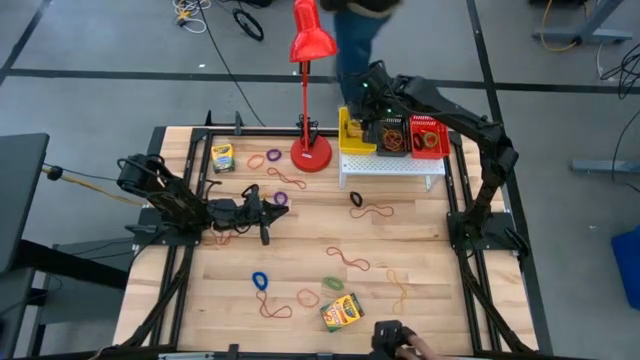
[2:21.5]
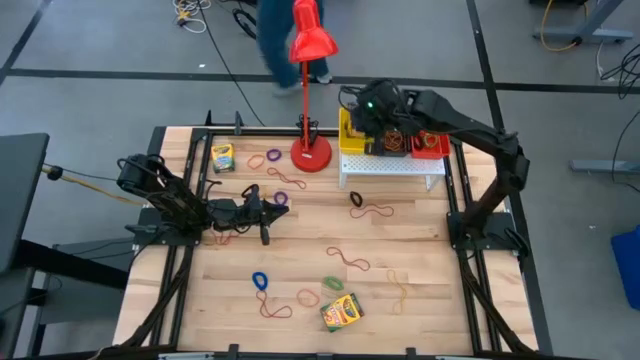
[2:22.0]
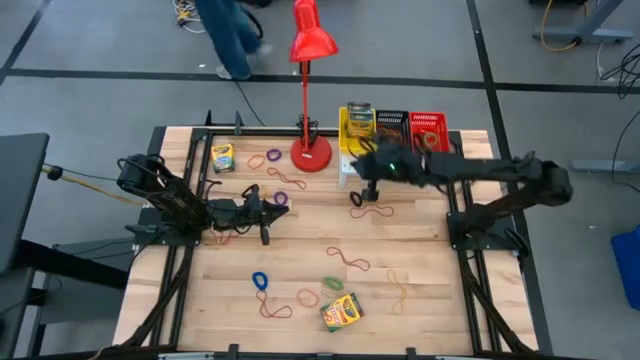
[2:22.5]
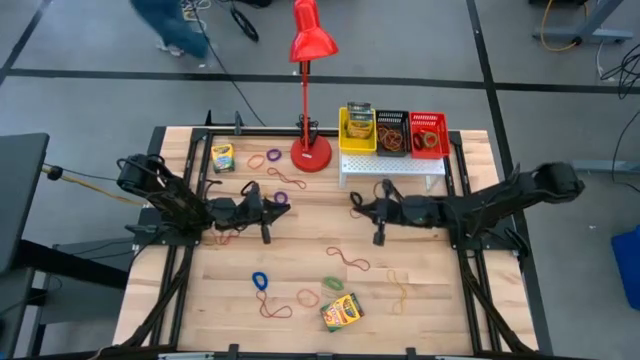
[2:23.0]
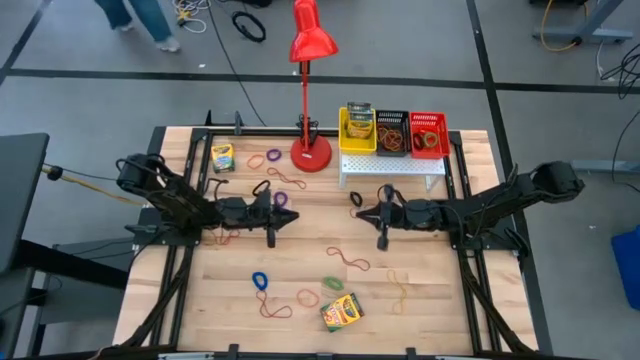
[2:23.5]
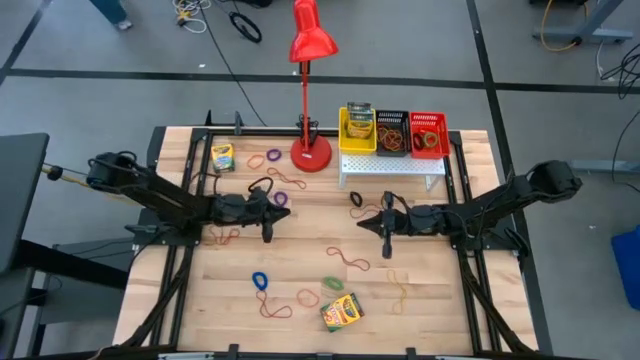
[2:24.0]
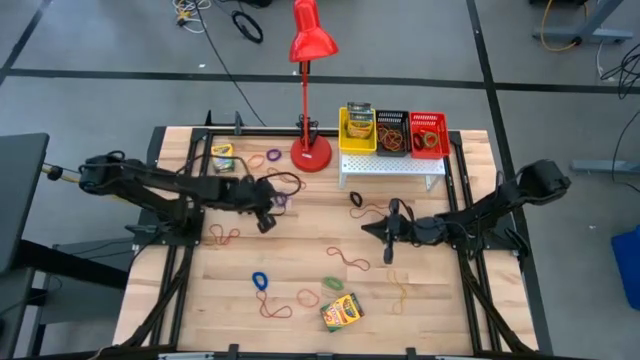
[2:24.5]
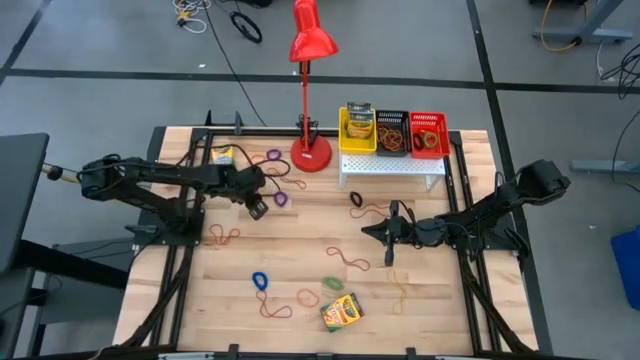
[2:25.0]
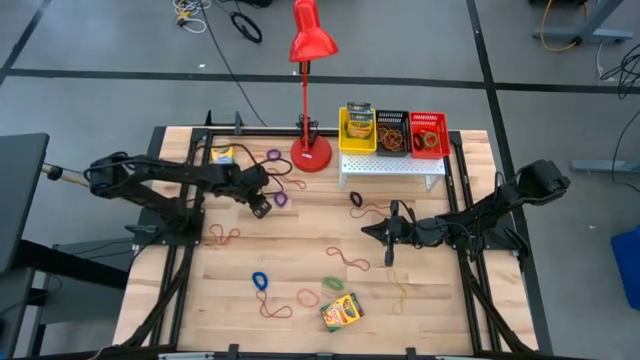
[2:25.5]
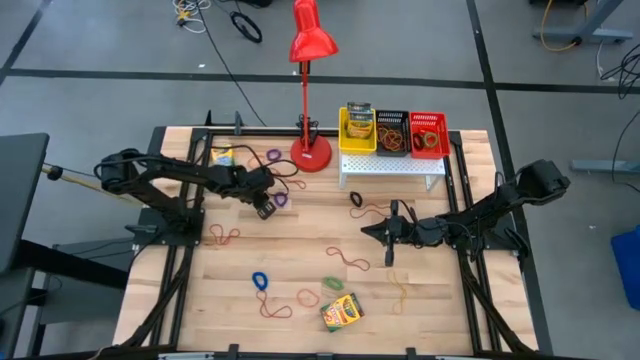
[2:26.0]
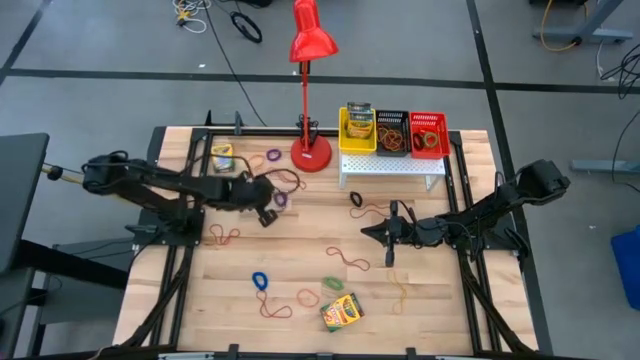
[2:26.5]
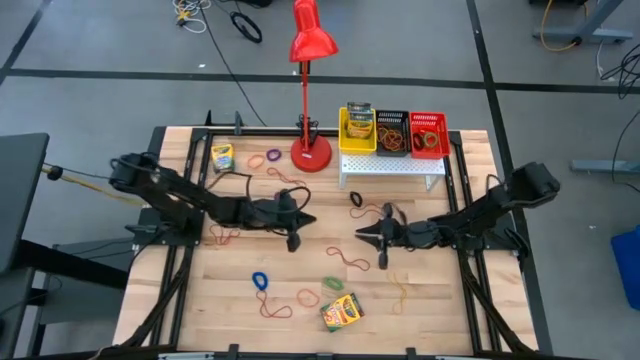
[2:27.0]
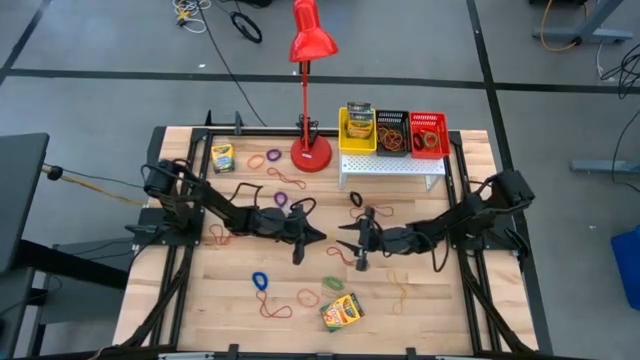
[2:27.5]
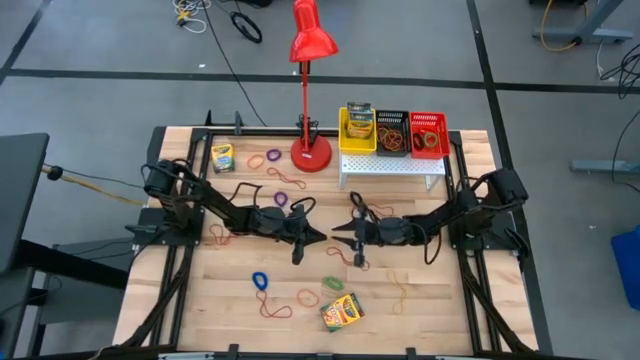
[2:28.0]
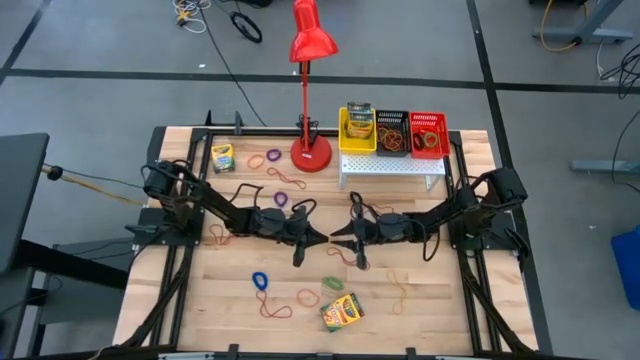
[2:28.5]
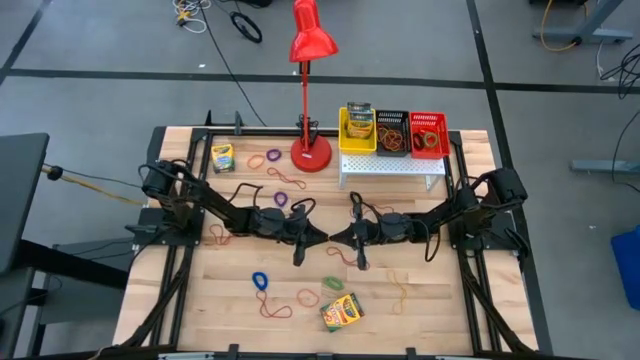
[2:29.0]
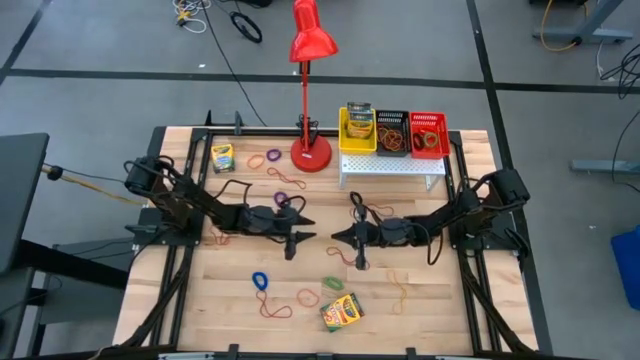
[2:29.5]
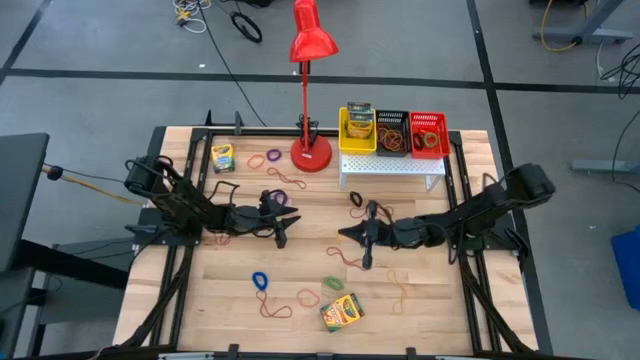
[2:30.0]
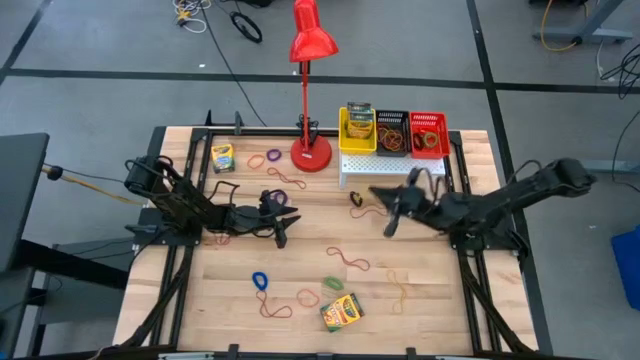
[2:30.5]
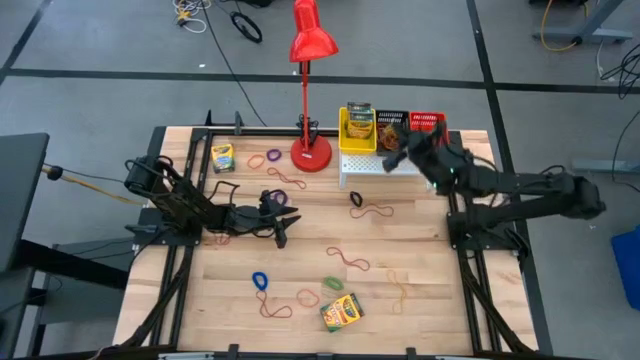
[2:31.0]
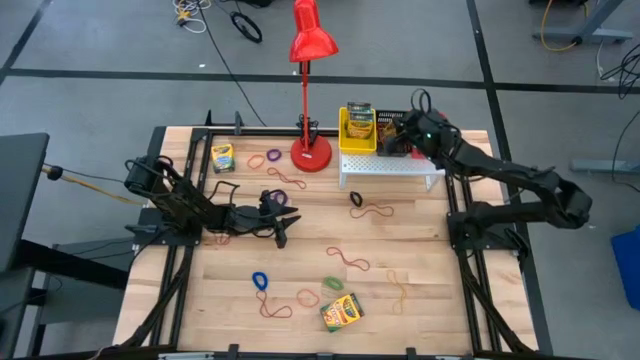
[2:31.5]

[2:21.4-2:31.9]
Task: Pick & Place Office Desk Supplies
Put the yellow rubber band into the black bin on the shelf

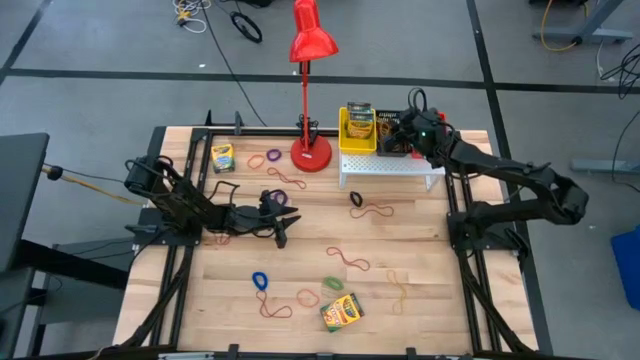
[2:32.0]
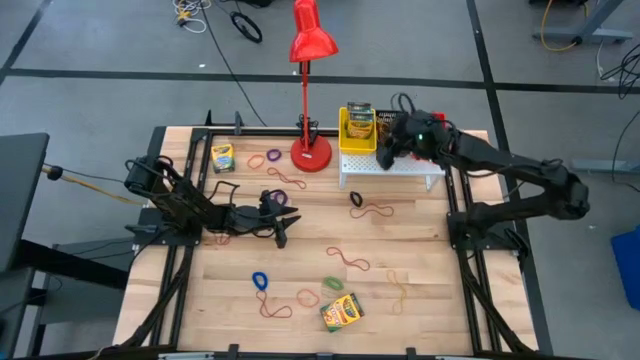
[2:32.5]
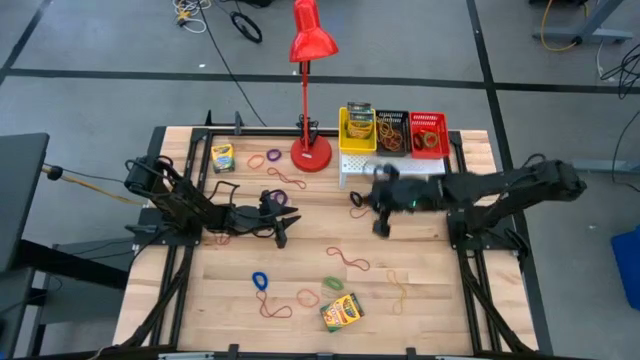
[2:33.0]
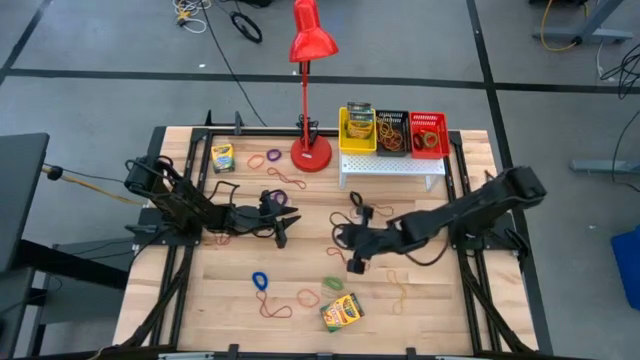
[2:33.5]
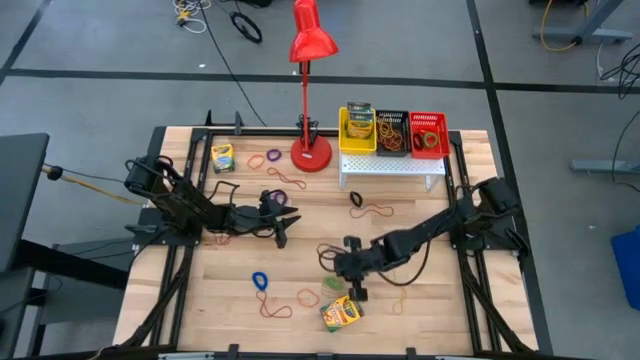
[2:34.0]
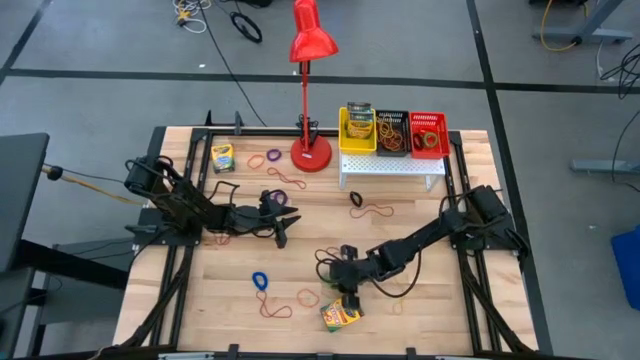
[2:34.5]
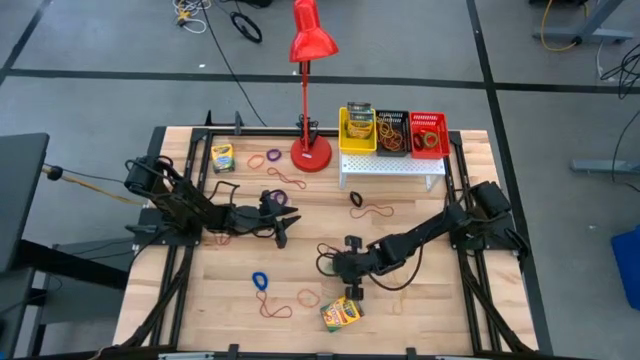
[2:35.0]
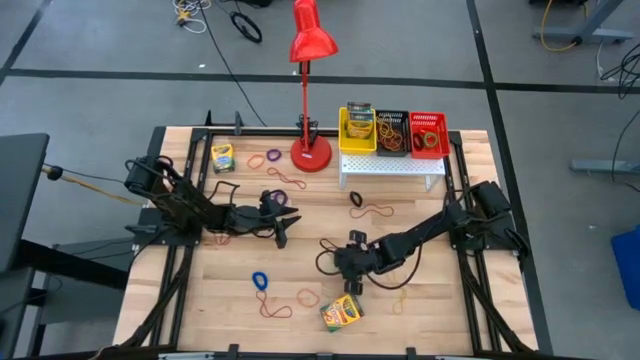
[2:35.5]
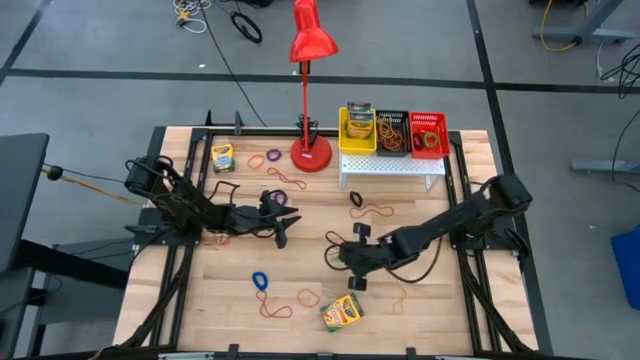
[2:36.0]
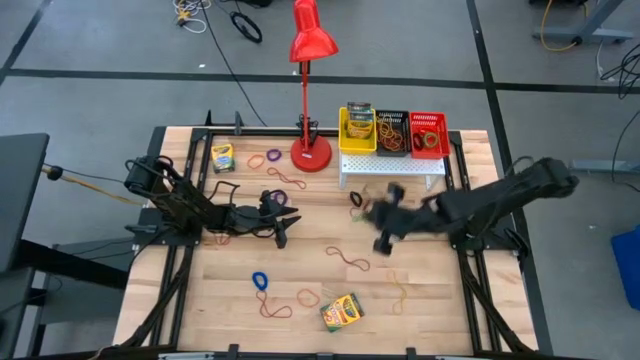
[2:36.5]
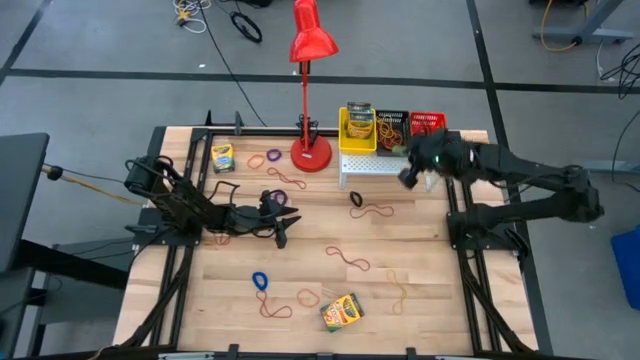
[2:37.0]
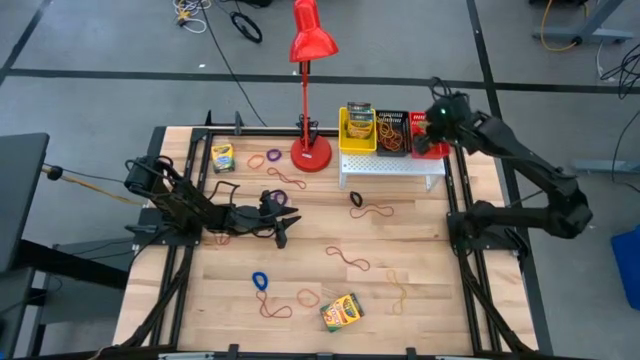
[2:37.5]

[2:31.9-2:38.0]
Put the green spring keychain into the red bin on the shelf

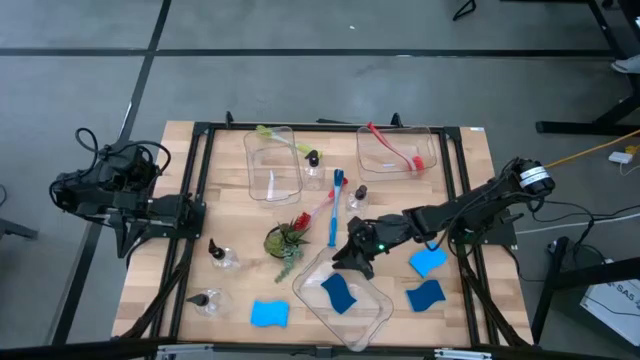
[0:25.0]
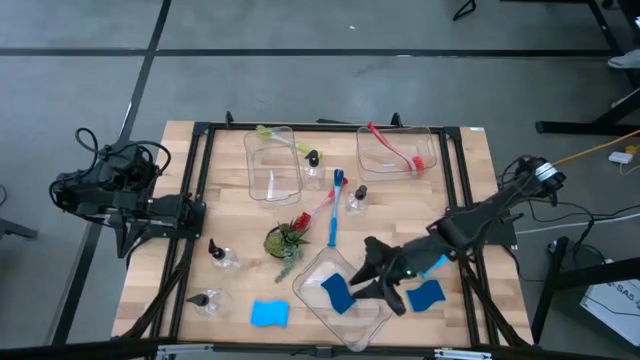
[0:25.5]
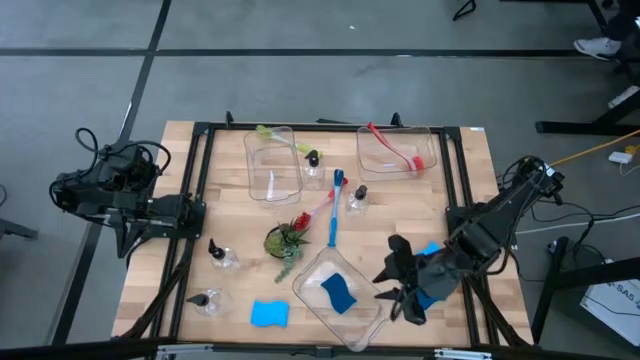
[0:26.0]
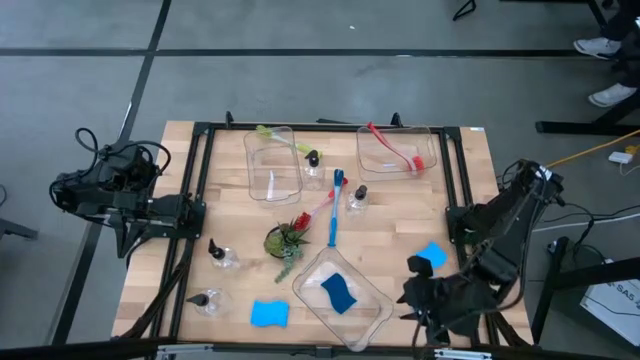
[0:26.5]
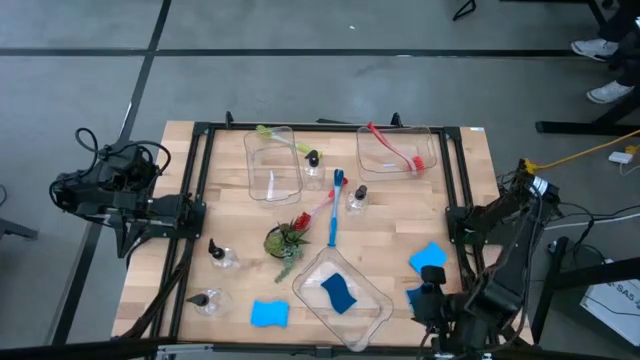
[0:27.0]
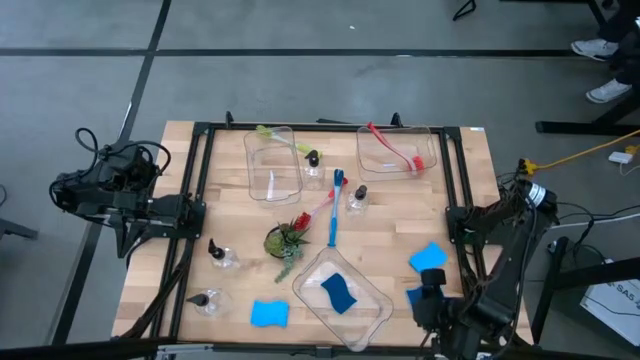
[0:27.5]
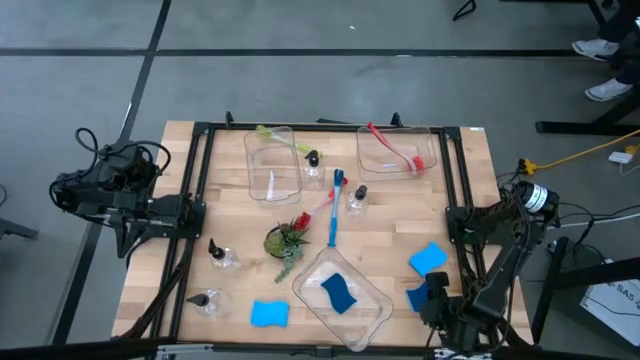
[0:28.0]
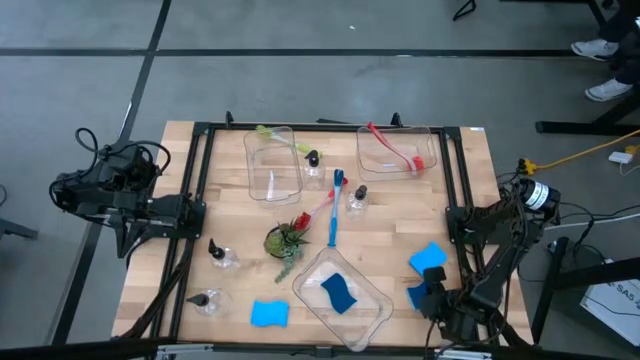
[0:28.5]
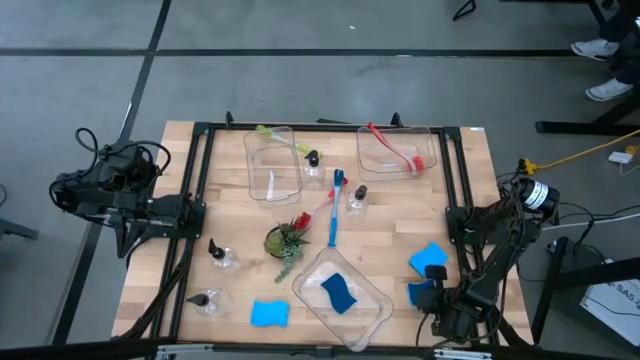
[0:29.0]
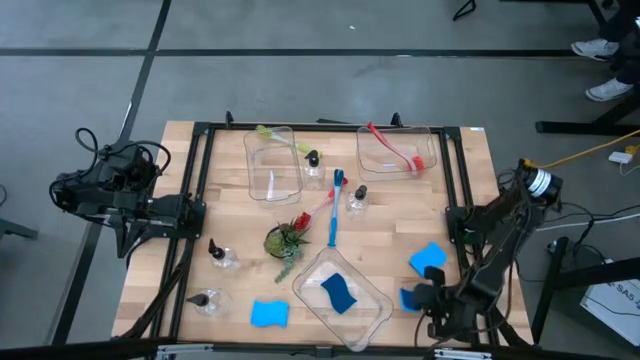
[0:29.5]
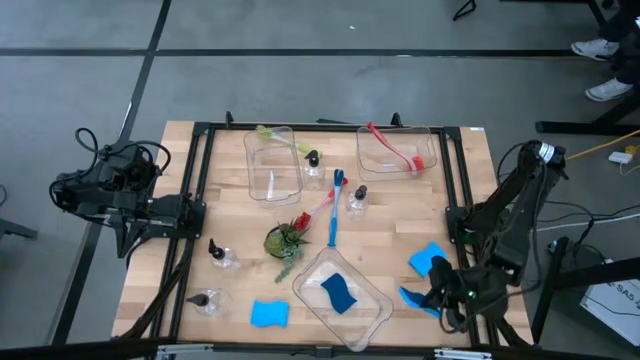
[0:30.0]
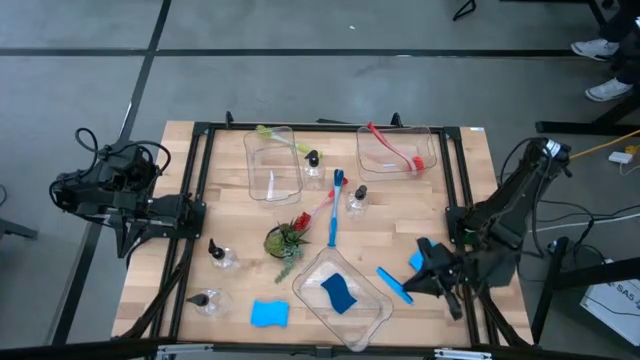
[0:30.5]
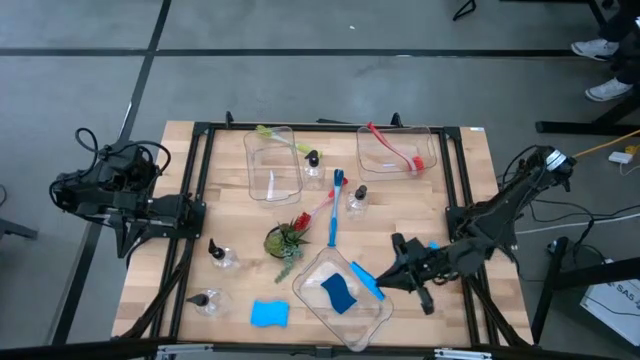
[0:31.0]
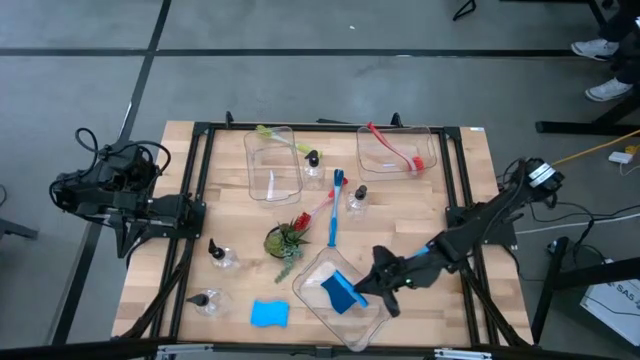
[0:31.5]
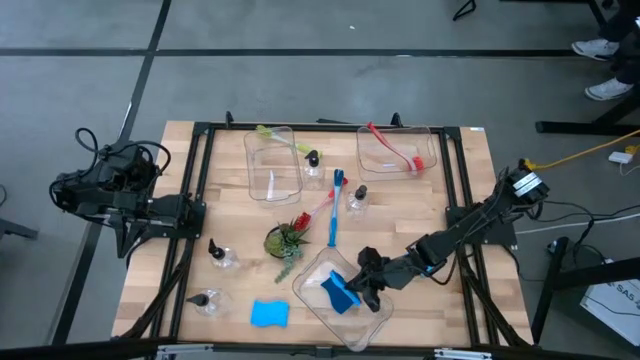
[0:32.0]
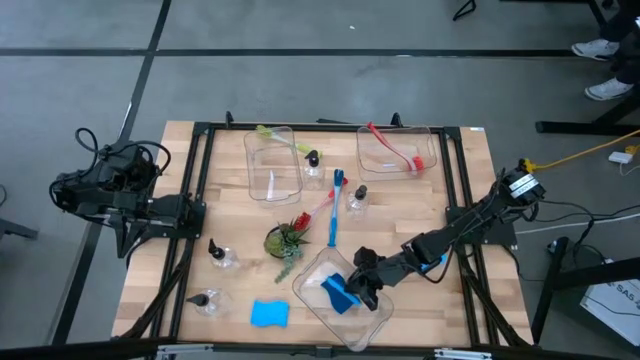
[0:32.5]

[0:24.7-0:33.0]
Task: Pick & Place Kitchen Sink Supplies
Put the blue sponge into the bottom transparent bin
